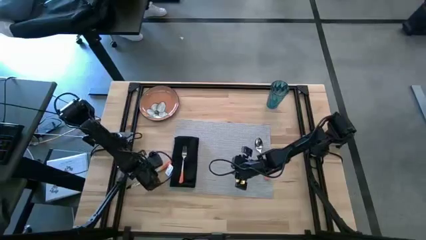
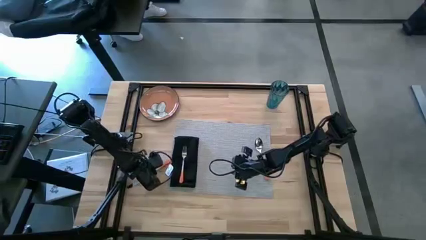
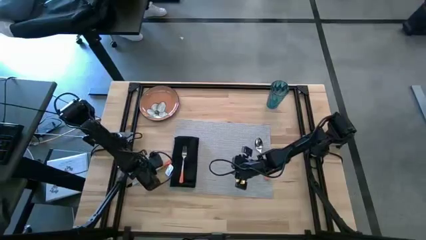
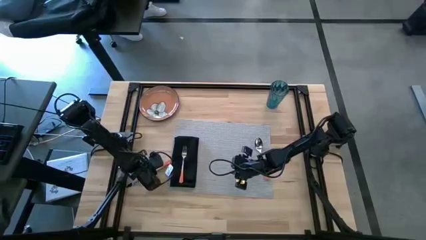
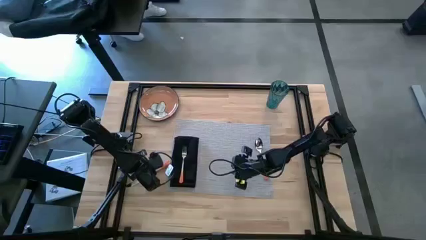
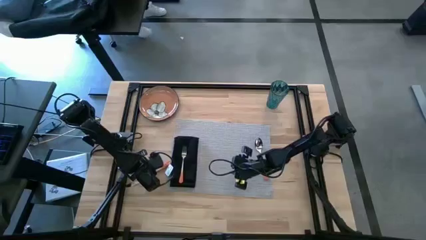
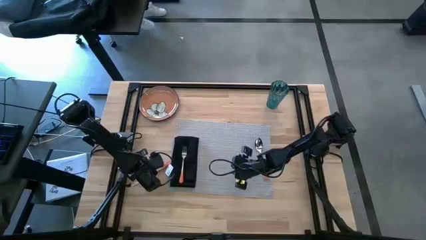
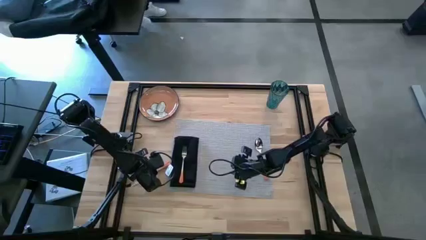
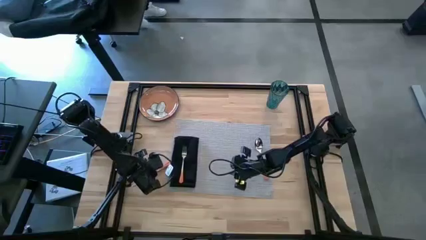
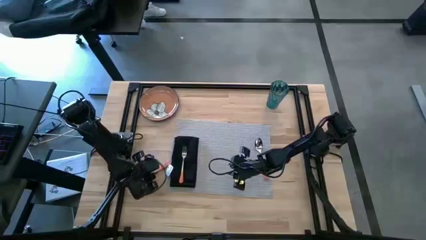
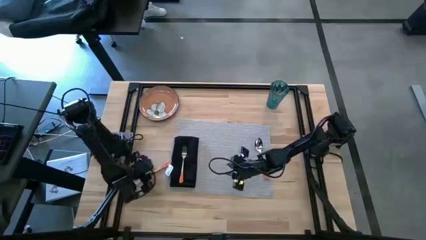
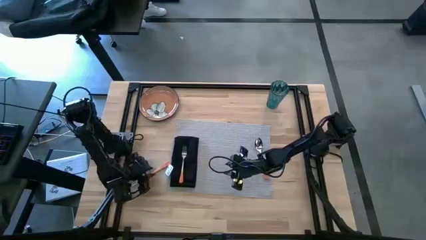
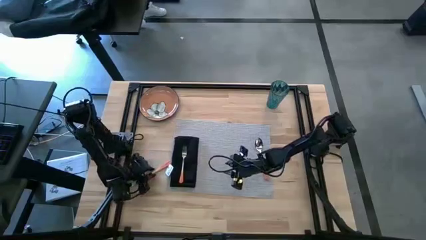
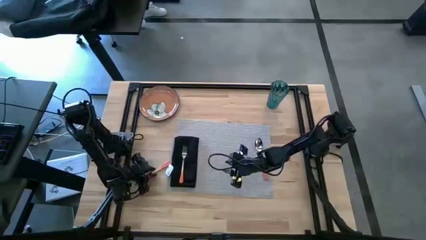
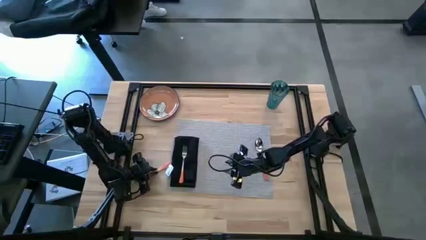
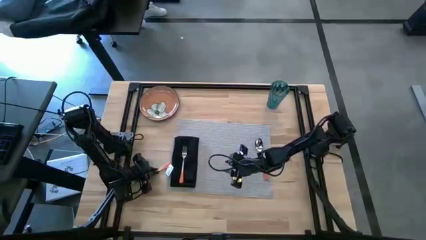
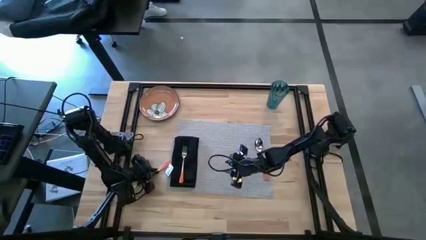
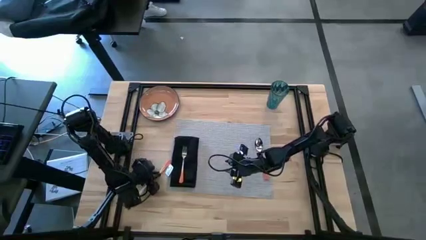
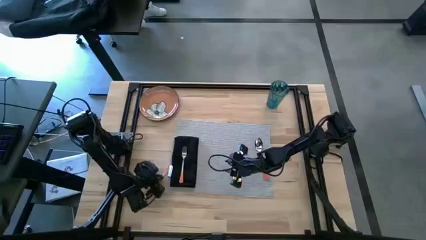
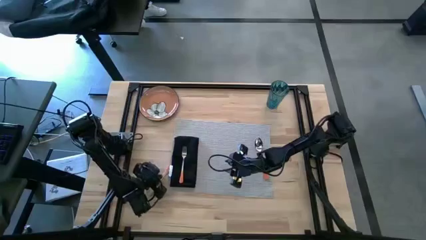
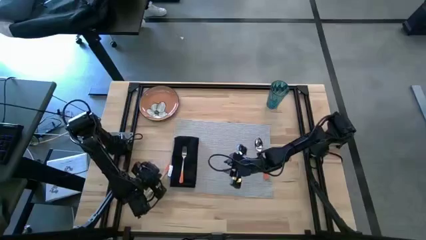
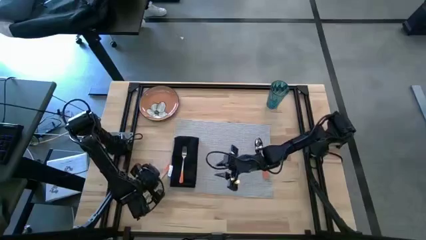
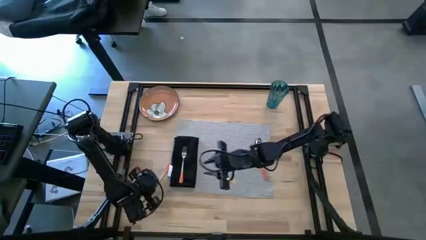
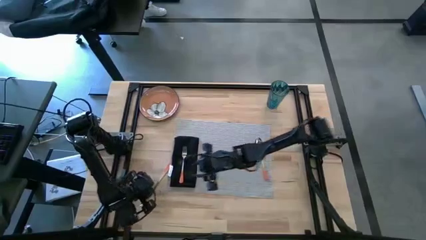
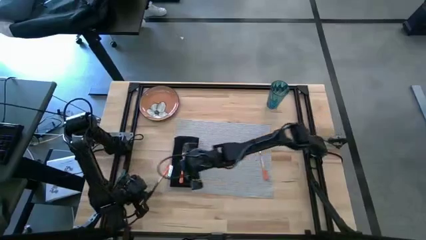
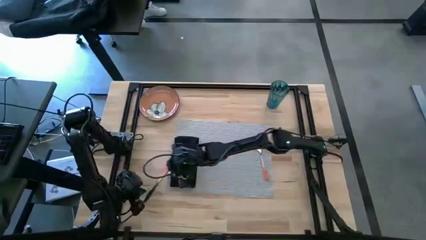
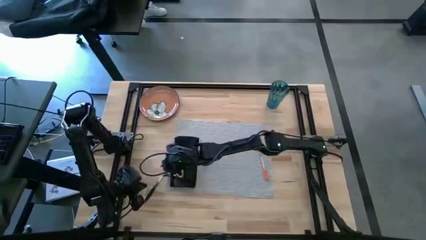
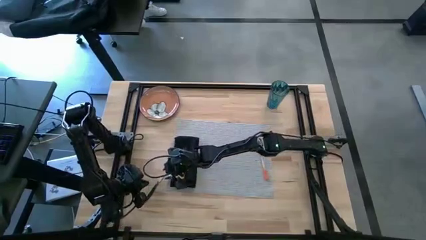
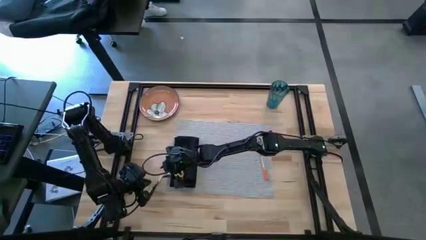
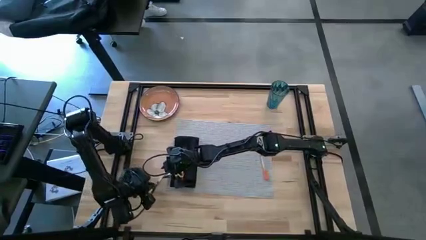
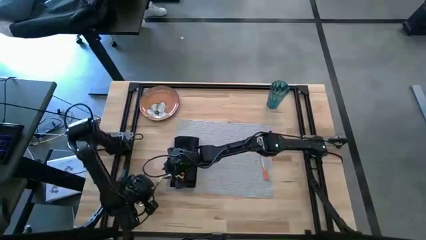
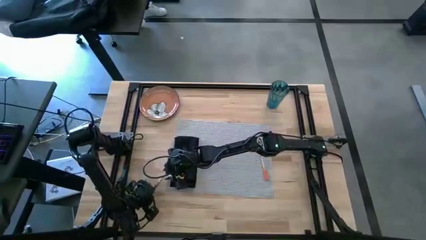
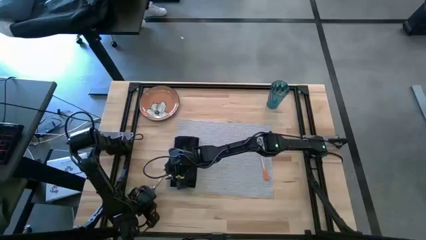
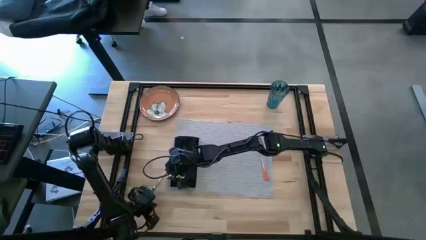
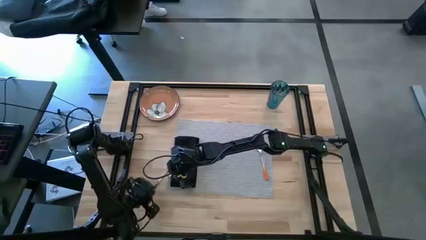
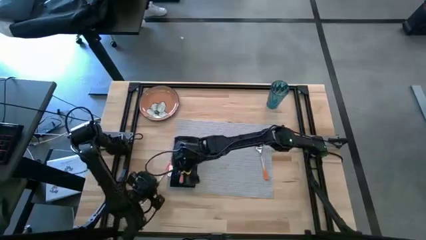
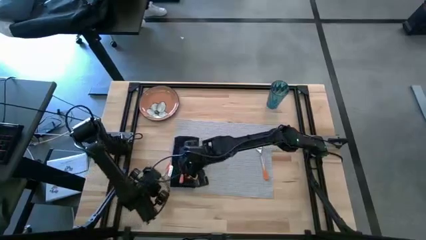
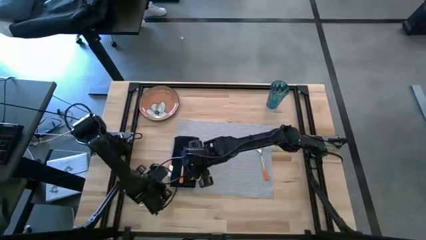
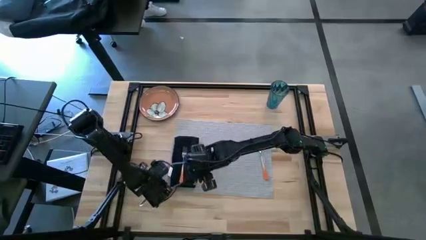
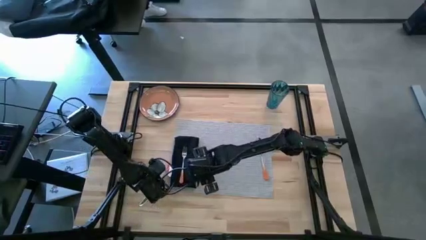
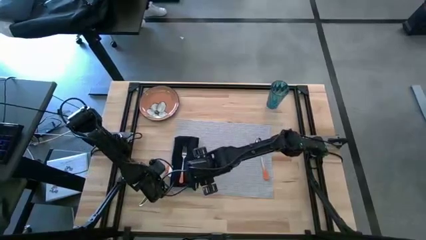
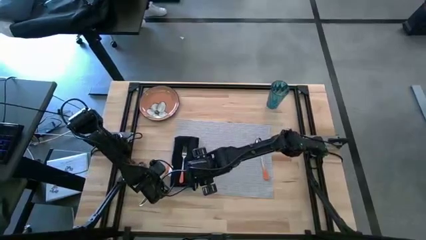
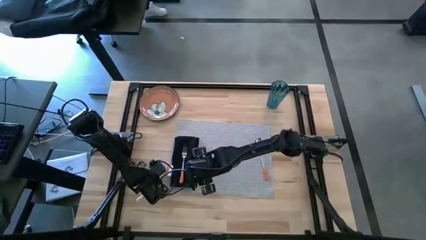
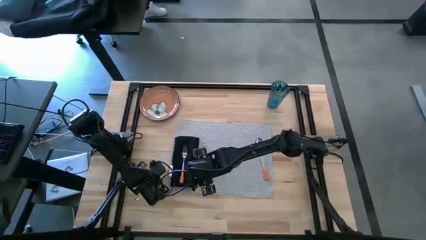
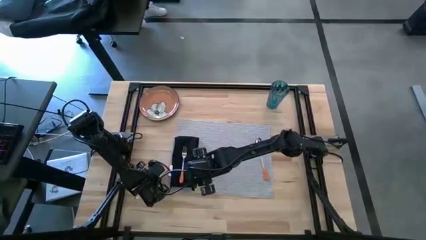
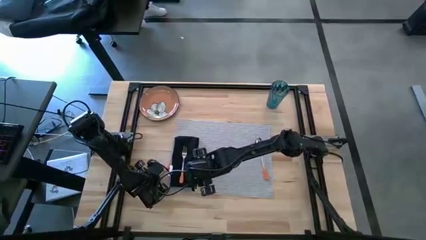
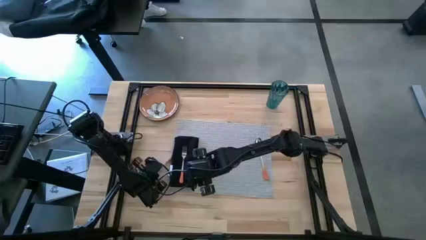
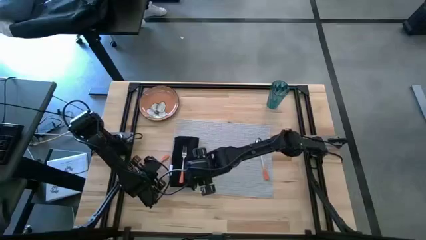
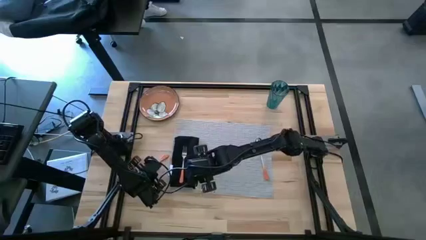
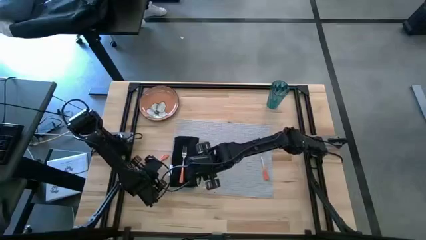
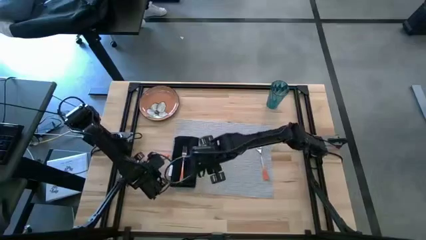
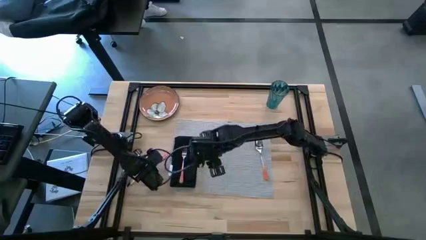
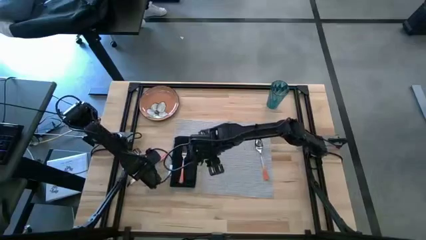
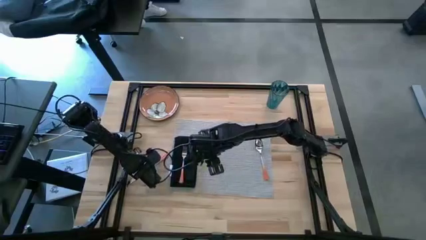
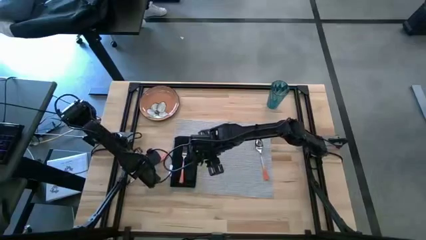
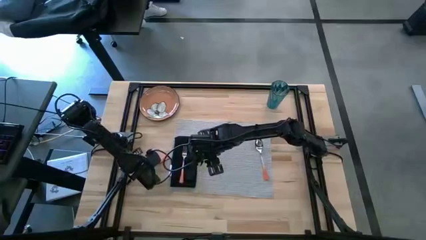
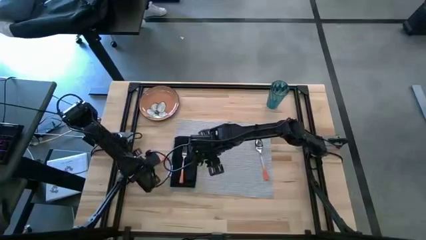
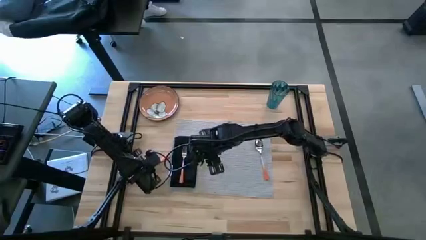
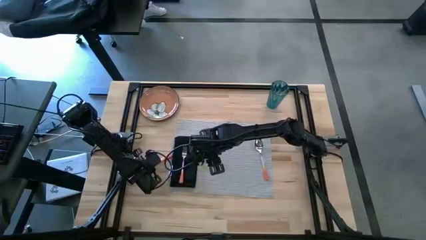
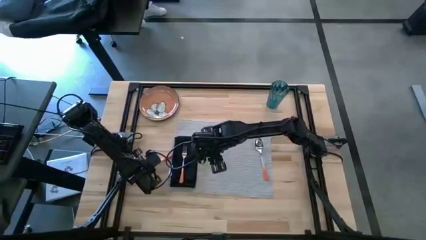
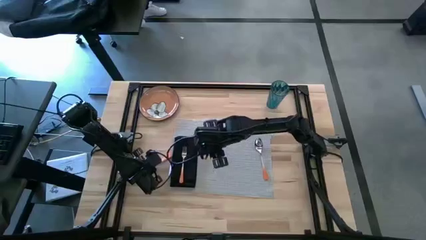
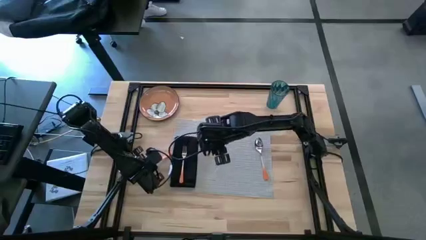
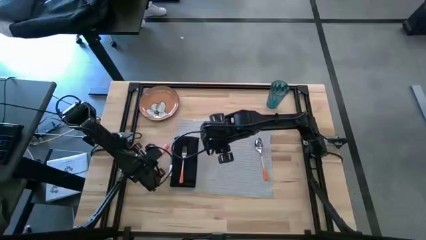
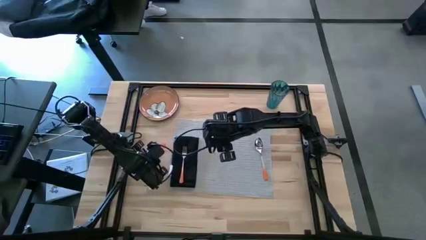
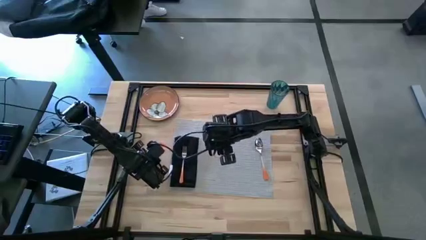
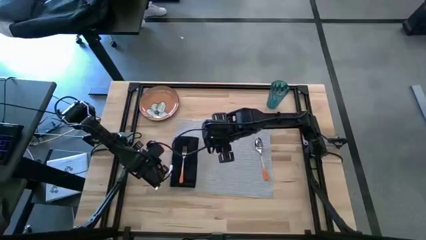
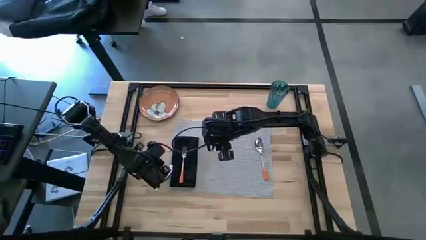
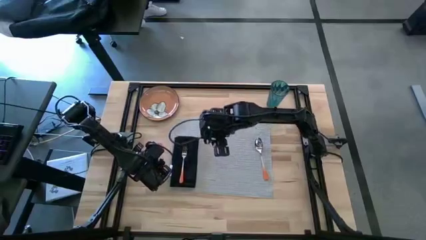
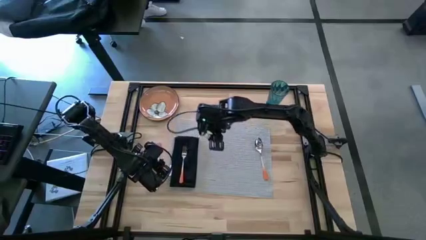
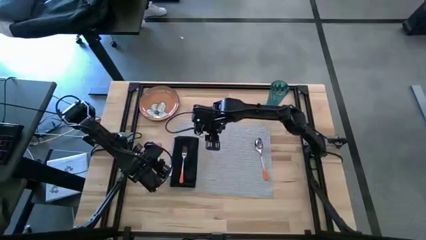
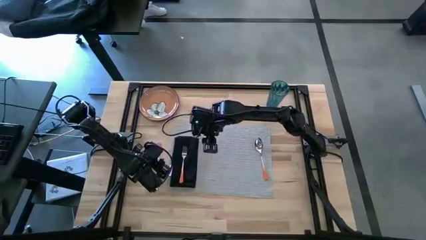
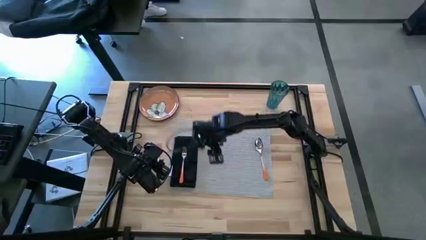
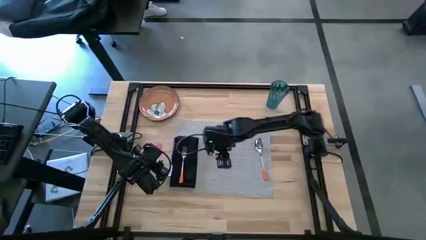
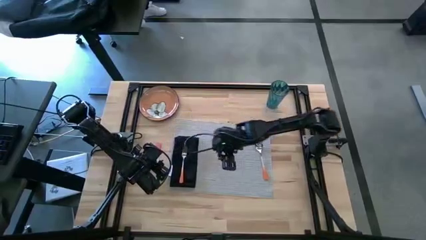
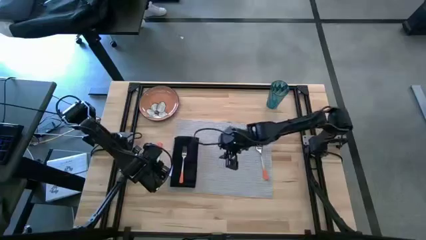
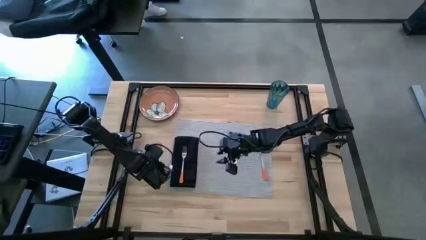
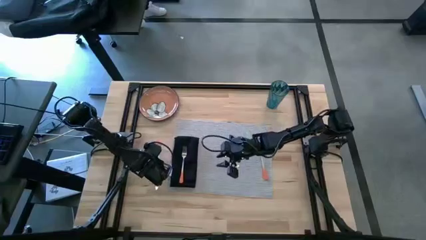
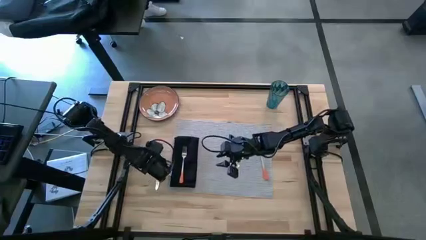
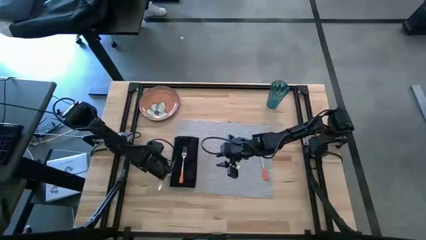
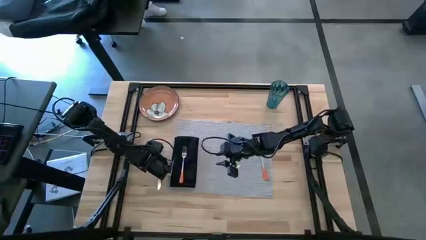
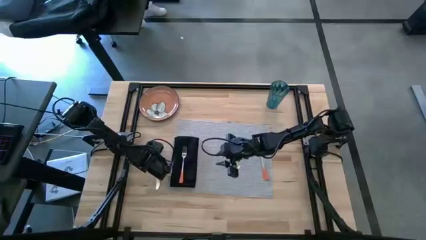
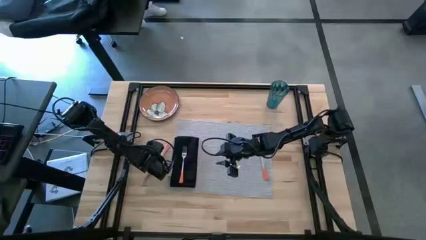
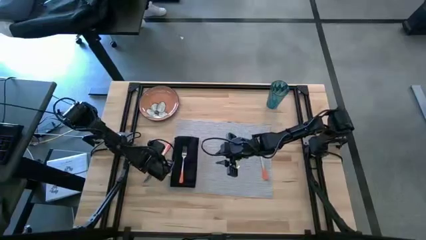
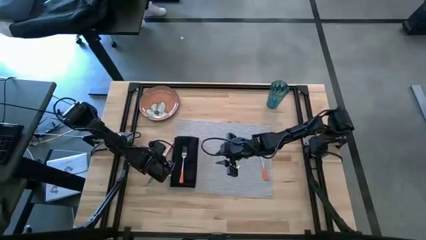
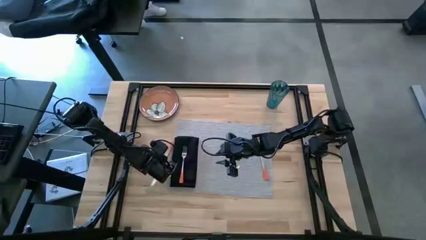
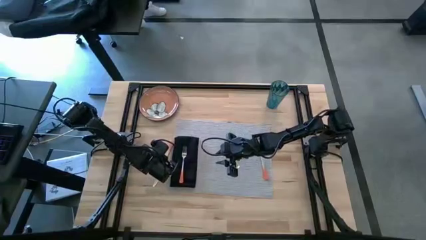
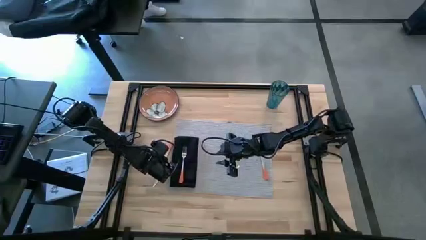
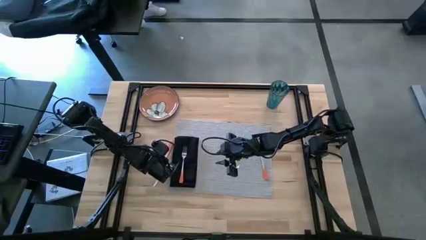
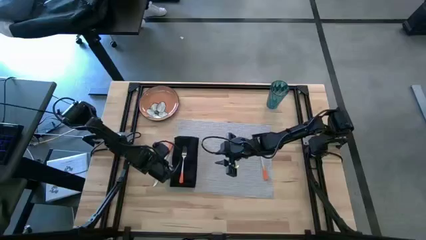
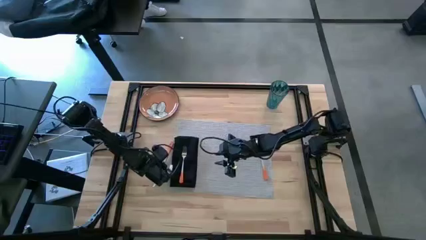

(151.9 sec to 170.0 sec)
Task: Set table place
Put the orange table knife on the gray table mat beside the orange spoon
